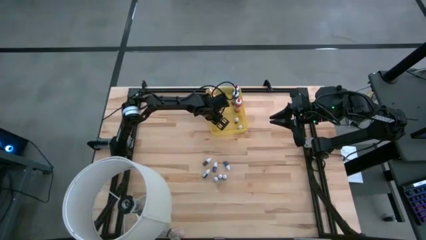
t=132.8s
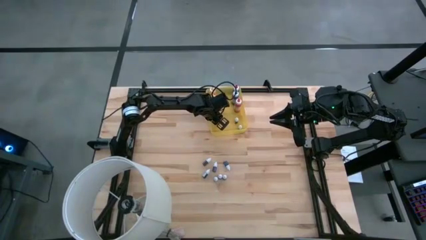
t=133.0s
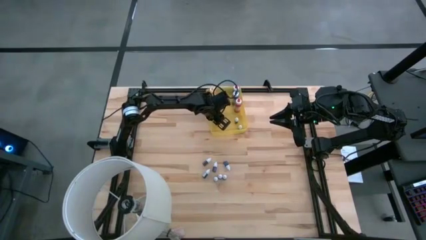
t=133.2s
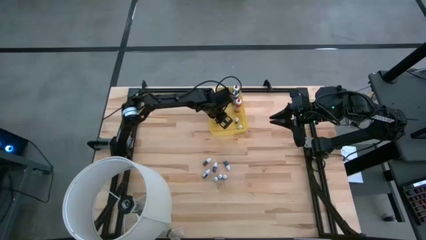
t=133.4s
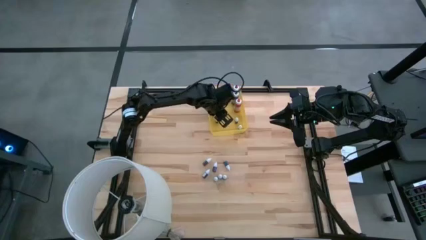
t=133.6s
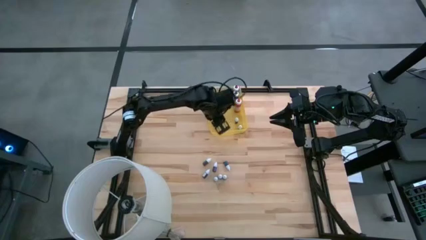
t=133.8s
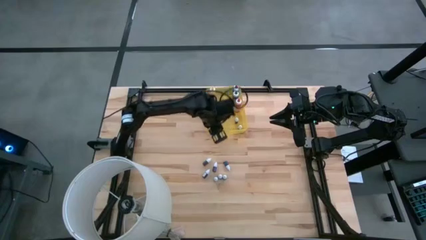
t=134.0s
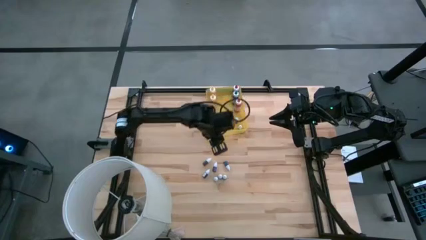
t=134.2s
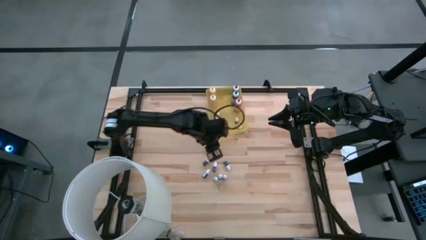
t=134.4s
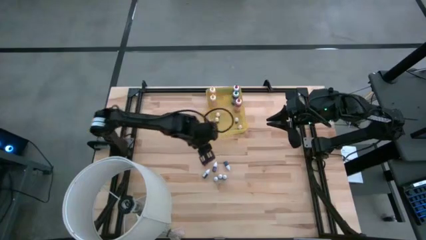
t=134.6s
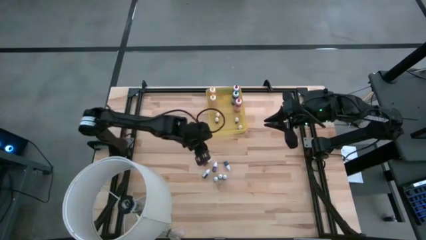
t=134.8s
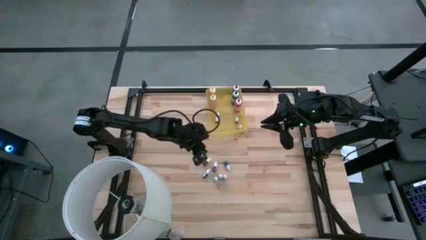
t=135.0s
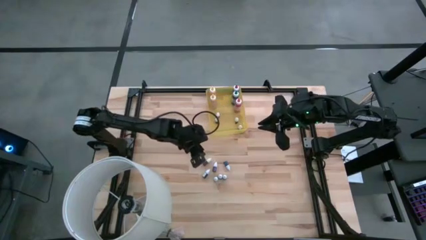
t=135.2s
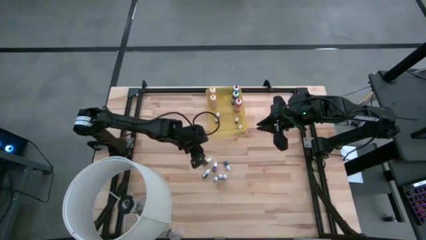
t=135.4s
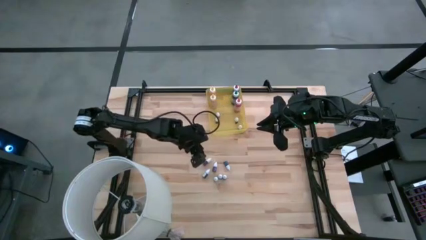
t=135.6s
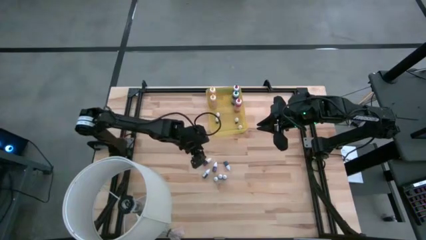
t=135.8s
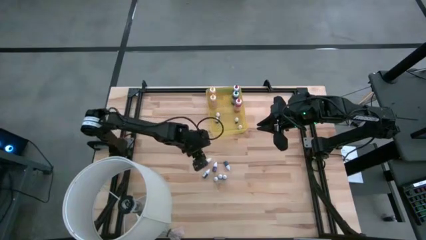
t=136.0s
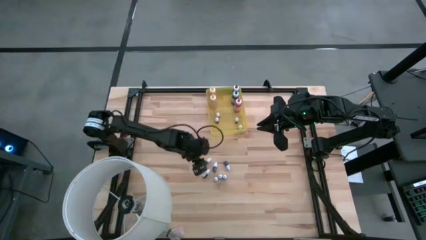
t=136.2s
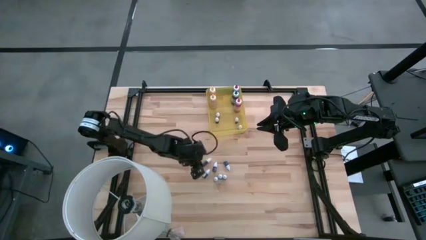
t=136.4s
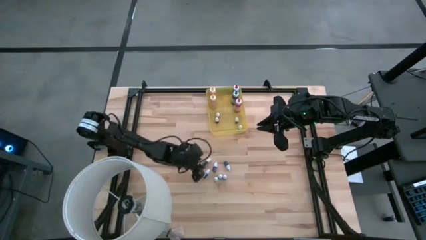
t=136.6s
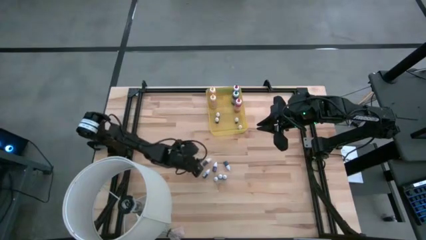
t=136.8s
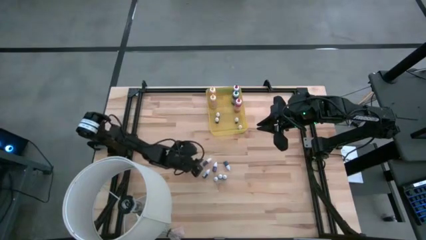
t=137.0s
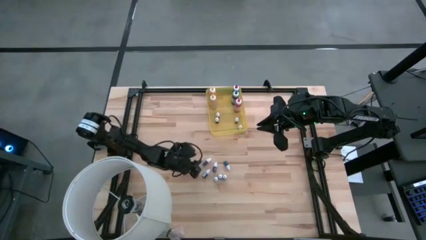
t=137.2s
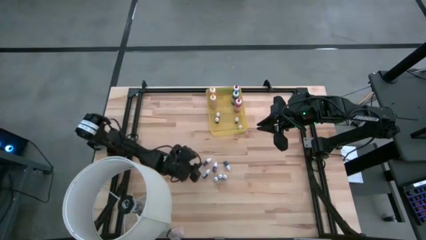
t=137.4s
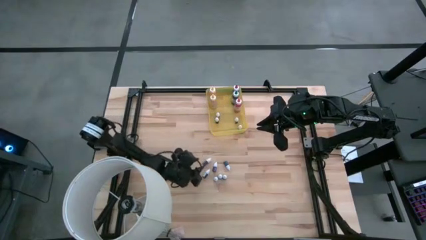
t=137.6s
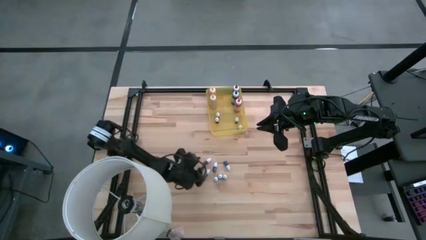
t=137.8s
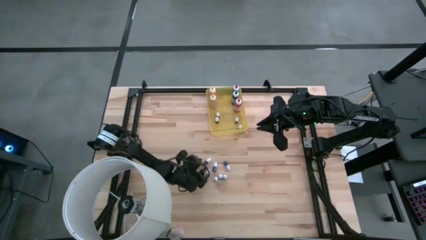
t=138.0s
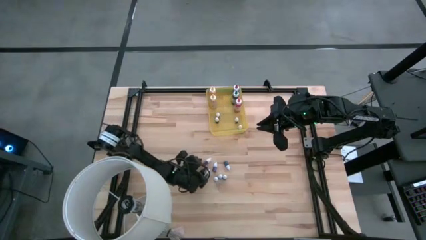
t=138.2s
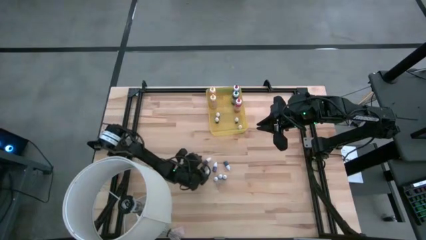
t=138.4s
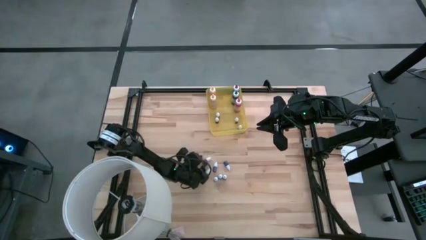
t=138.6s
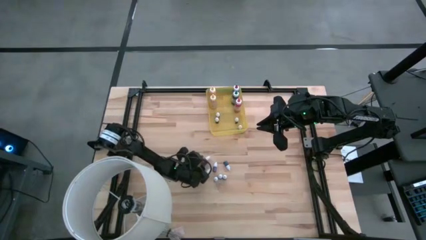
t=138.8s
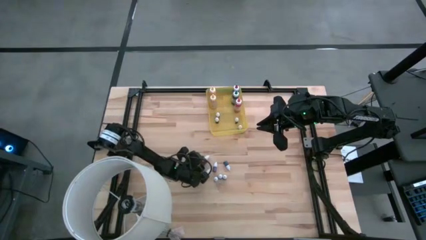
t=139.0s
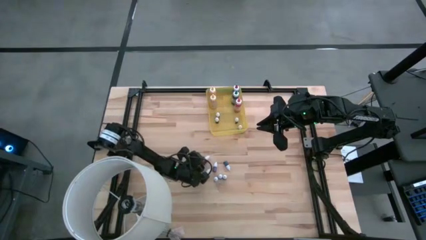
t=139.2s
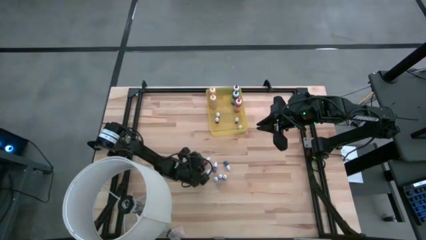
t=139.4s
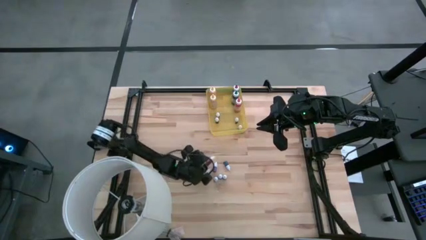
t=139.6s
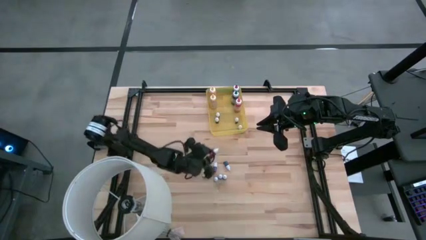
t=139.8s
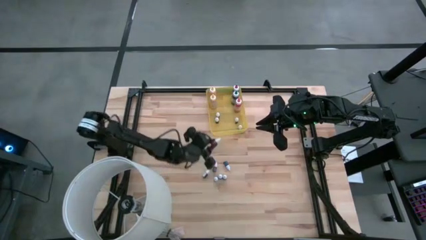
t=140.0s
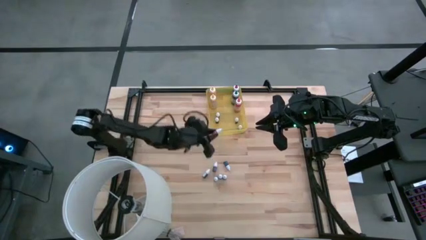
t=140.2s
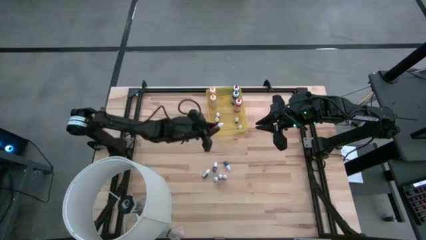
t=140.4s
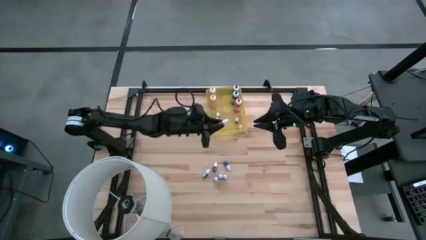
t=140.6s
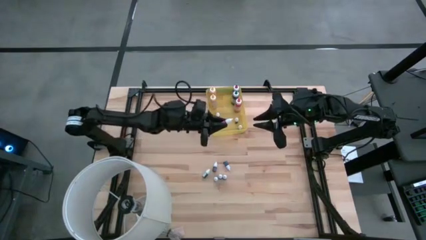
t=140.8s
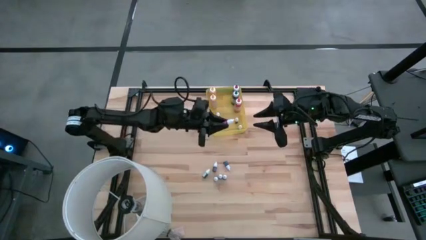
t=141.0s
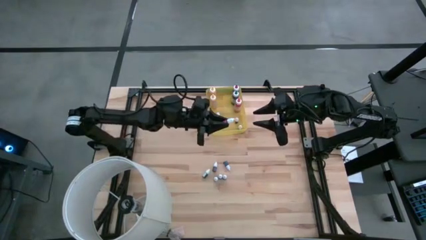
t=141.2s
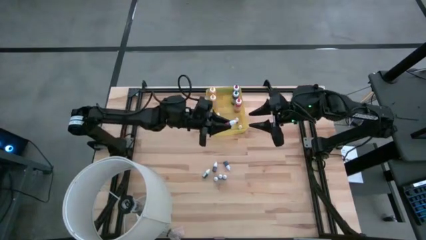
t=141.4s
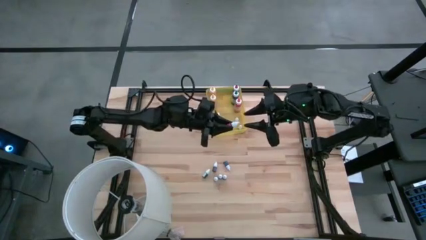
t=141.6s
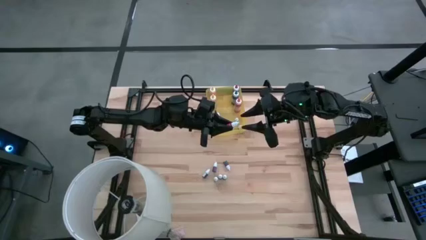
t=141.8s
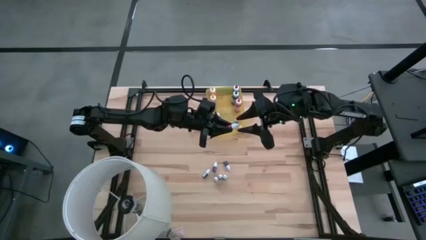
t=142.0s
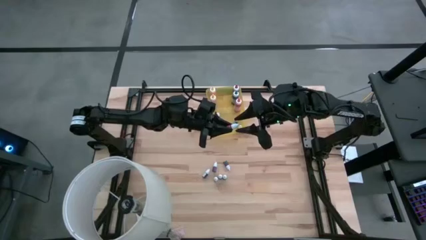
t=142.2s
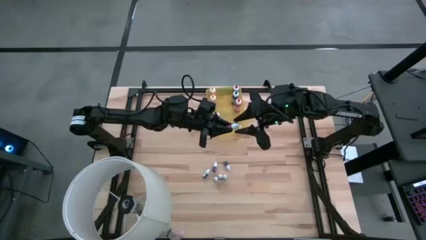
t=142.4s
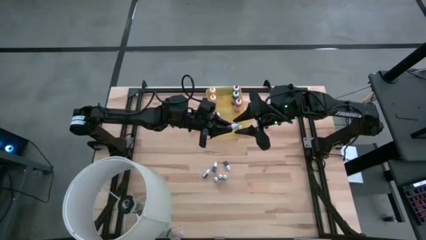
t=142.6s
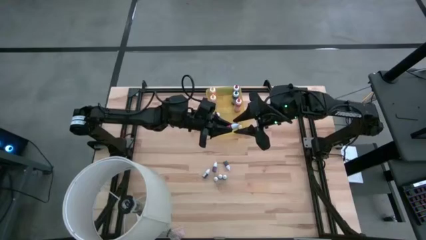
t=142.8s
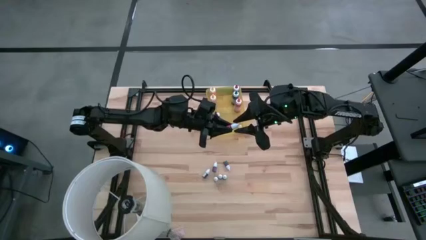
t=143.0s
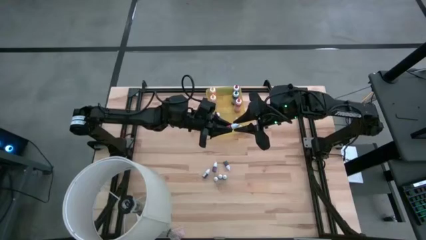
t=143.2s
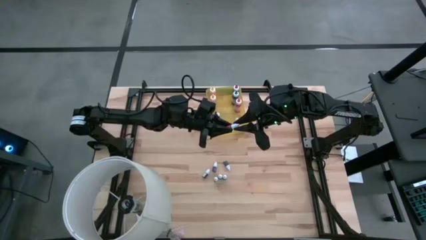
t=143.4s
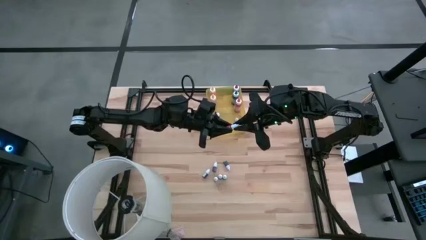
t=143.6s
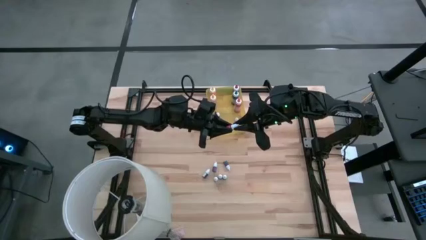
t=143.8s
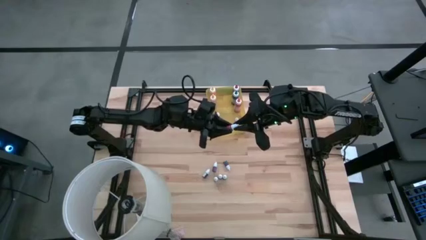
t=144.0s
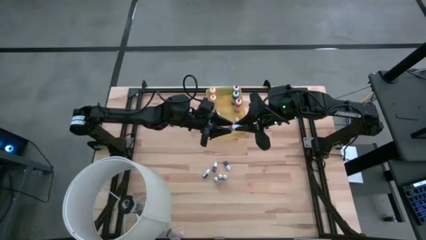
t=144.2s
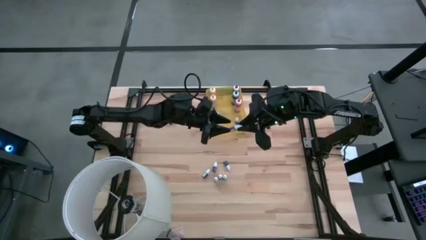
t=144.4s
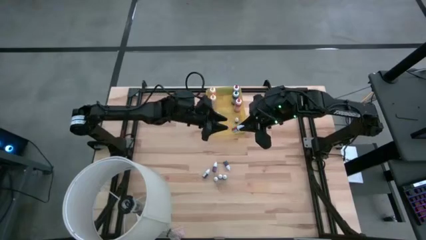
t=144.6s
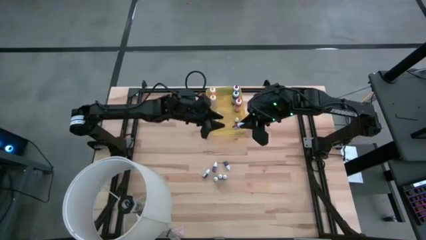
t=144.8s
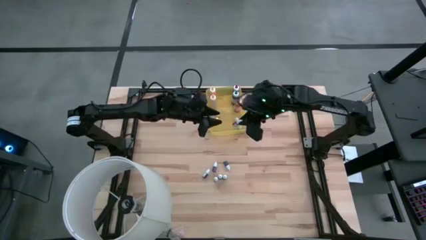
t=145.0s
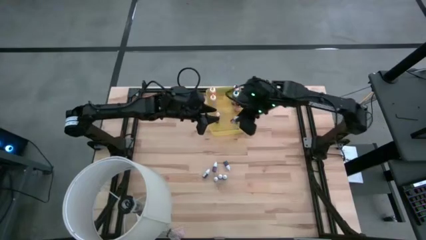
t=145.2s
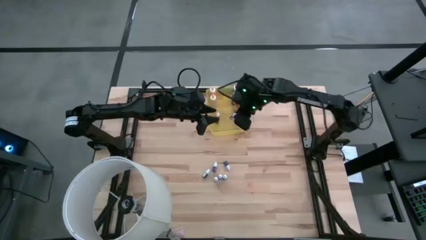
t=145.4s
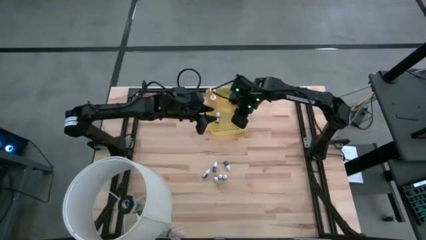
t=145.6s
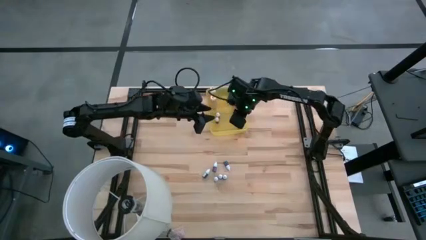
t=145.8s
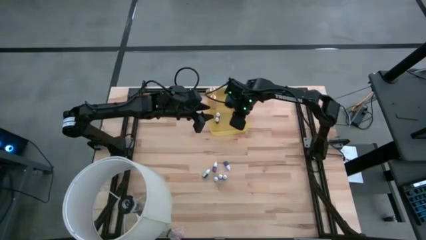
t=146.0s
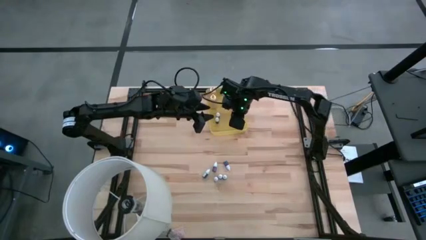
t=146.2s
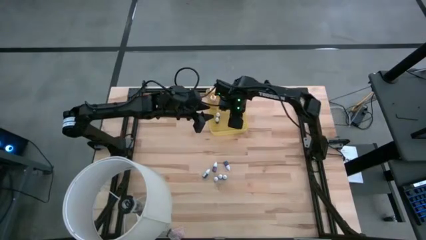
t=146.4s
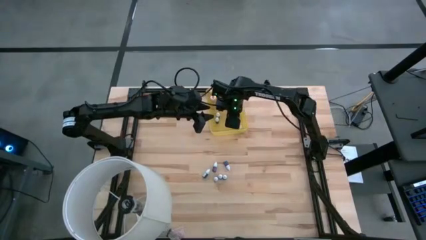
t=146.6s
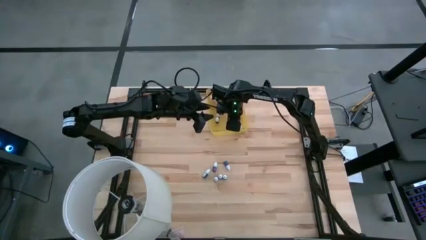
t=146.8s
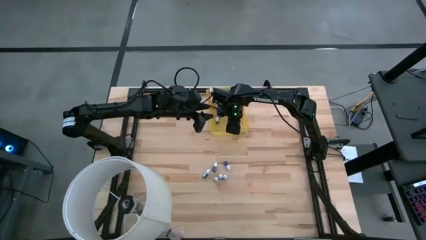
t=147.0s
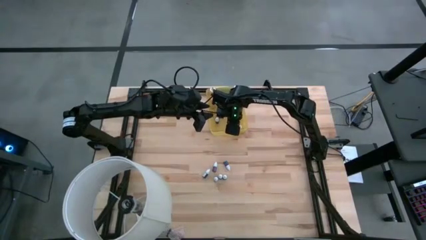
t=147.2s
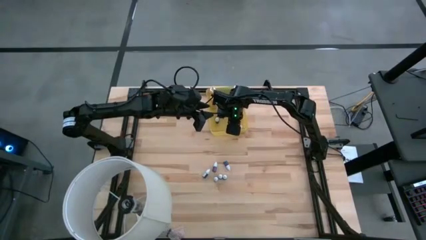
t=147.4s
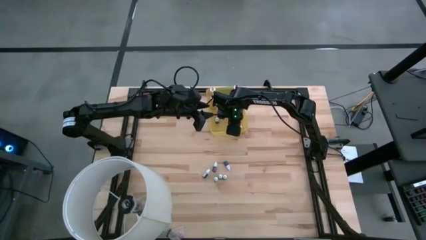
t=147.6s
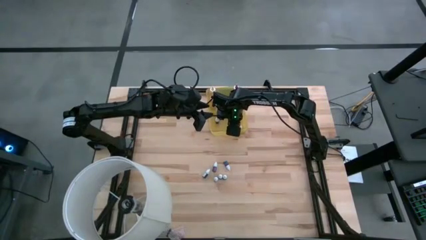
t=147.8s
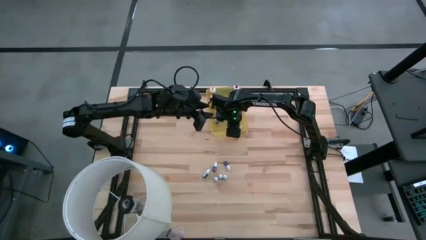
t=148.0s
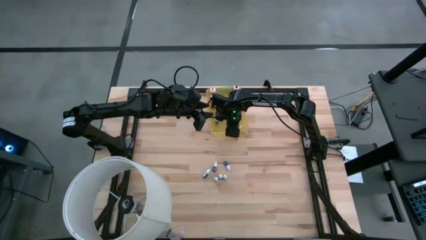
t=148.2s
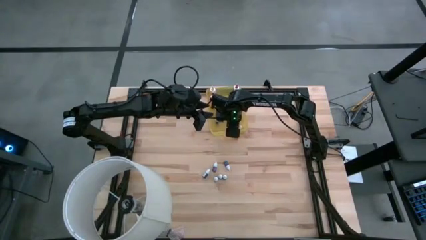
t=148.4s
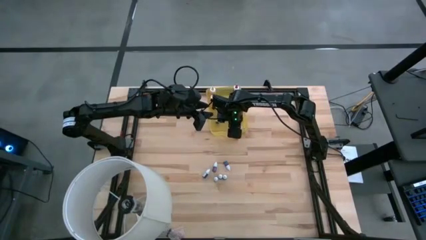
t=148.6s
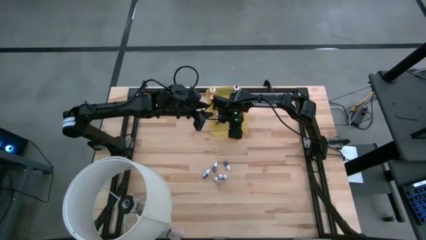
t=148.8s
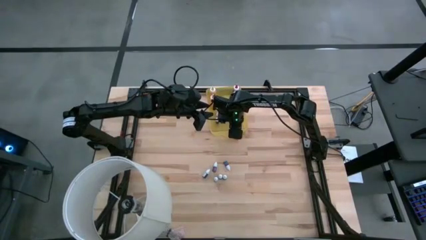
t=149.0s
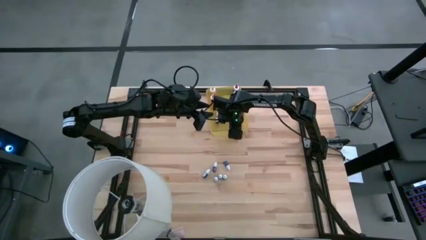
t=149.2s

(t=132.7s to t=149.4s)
Task: Pick & Place food coloring
Put the top small red food coloring bottle into the yellow bin
